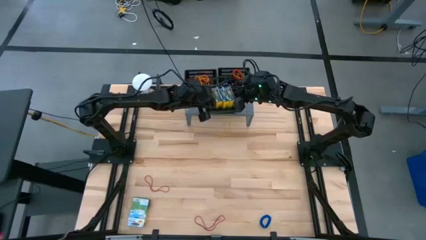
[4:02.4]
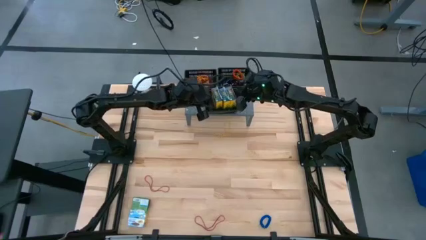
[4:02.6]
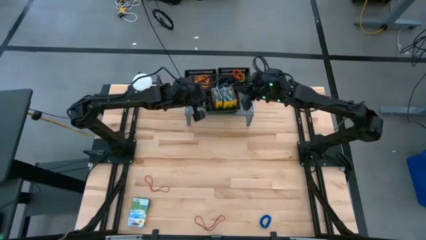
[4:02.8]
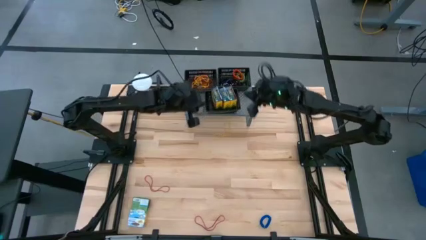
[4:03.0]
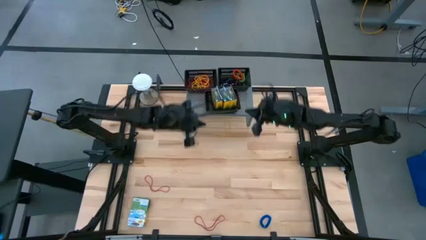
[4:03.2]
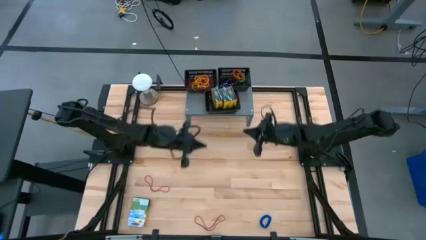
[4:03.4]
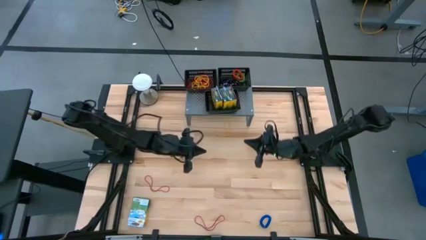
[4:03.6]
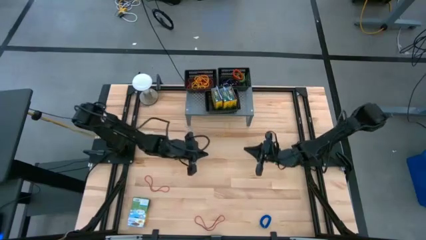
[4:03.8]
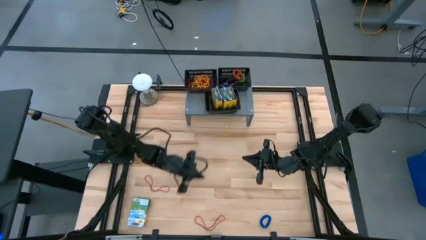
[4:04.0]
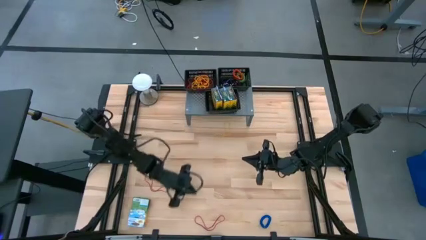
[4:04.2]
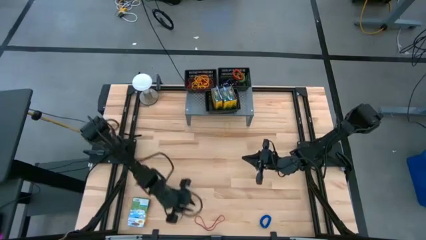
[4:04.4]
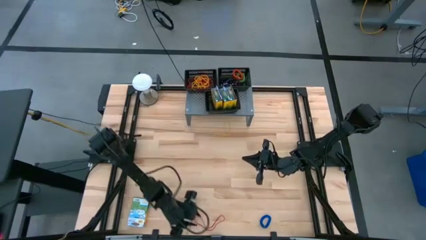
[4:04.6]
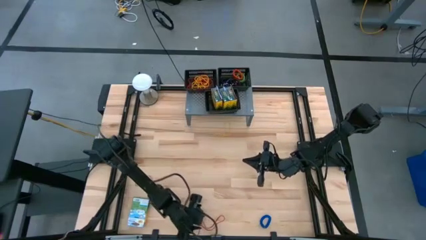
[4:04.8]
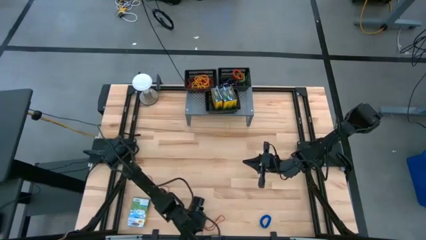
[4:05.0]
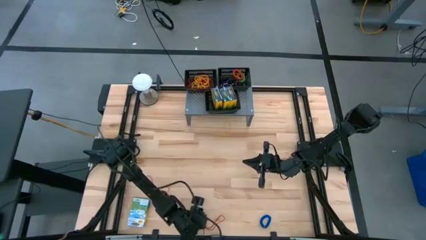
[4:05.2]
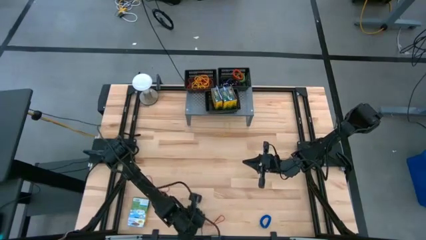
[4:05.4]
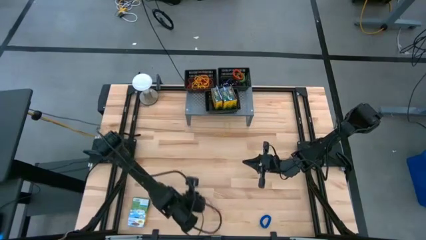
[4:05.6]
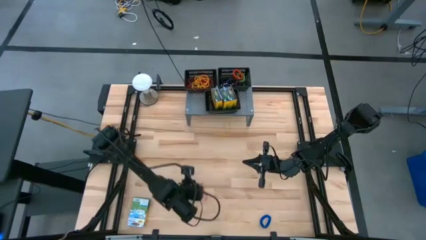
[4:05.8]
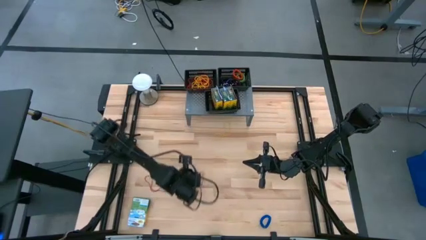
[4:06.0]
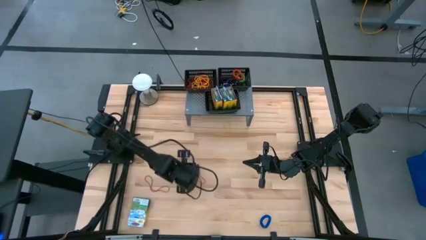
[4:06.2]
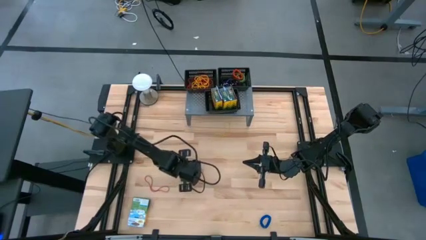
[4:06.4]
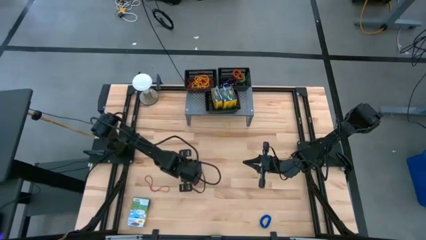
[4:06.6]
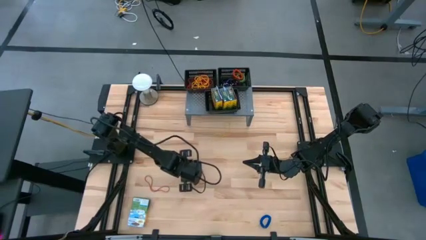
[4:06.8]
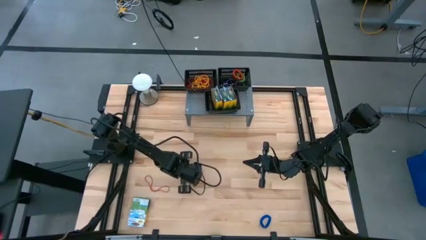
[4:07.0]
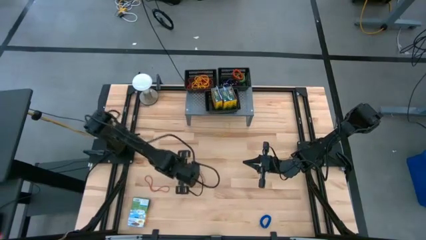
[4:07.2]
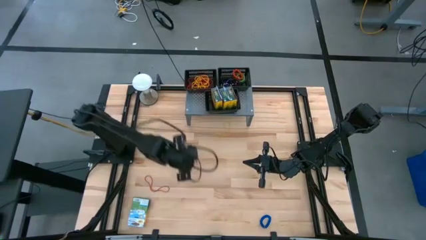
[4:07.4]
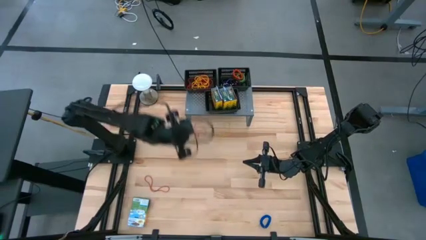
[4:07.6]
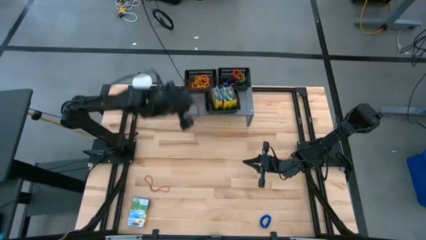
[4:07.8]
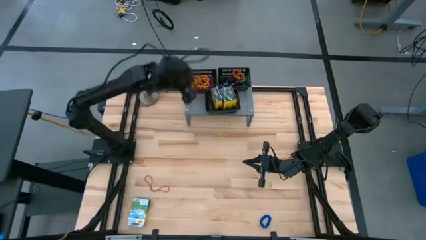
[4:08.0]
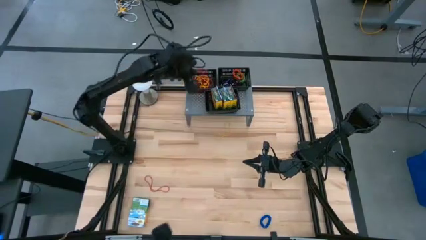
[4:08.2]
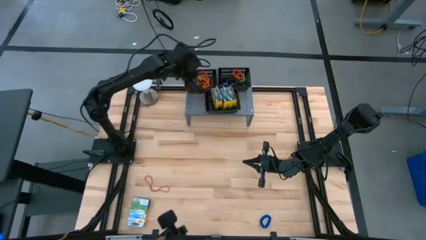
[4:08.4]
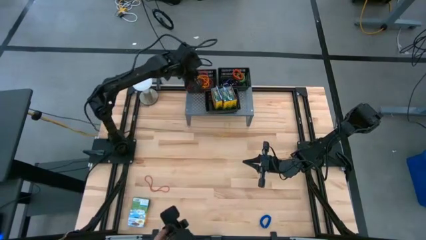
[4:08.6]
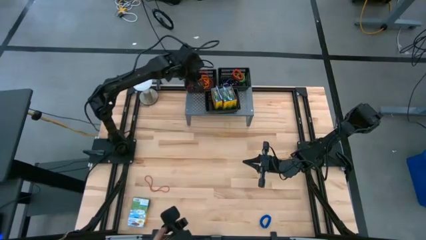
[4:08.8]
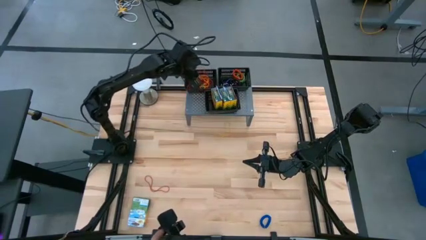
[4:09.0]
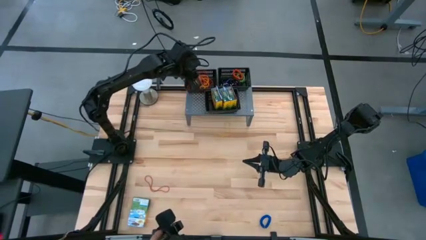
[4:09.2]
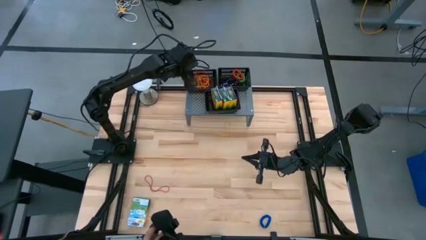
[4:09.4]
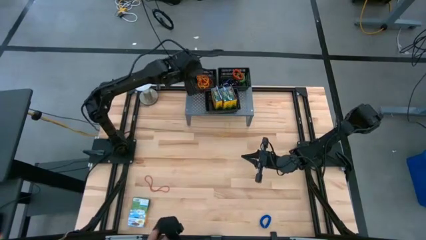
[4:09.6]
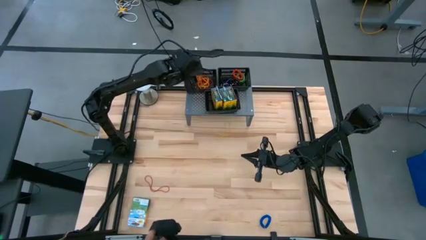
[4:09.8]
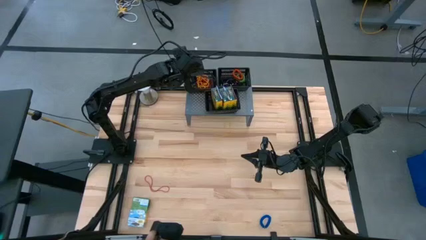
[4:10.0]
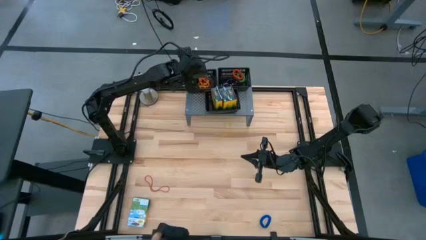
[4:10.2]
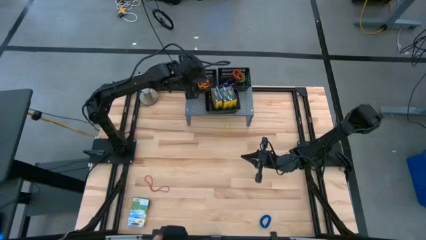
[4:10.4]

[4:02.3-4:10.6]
Task: Pick & Place Office Desk Supplies
Put the red rubber band into the top left black basket on the shelf

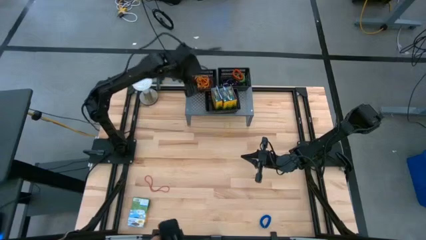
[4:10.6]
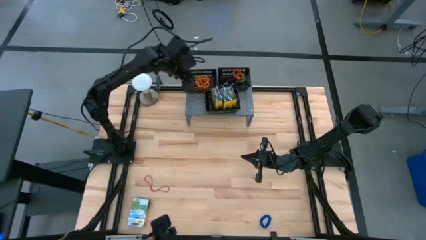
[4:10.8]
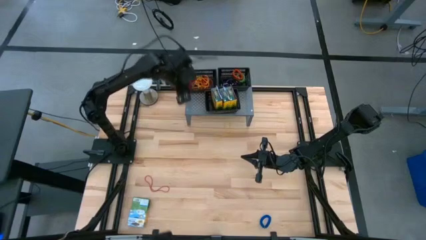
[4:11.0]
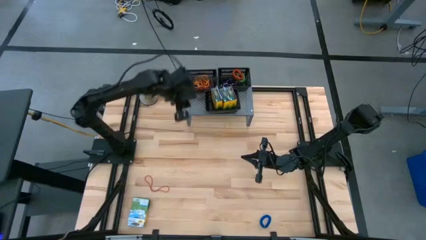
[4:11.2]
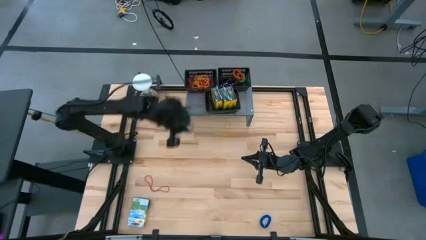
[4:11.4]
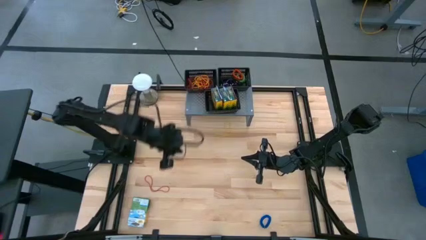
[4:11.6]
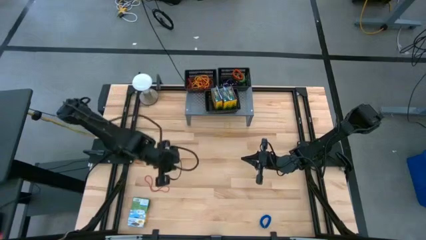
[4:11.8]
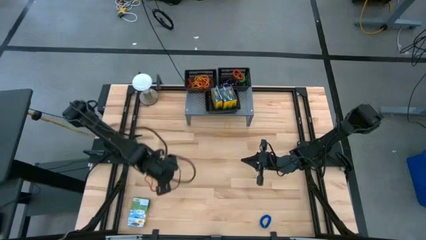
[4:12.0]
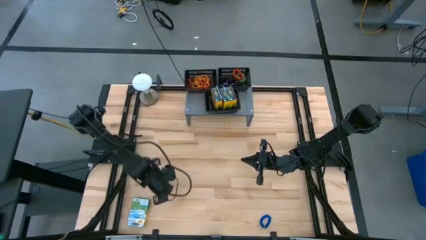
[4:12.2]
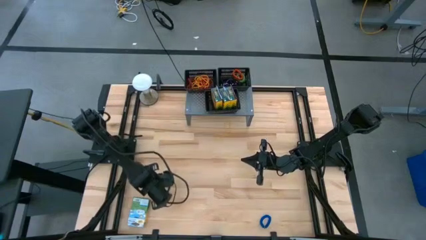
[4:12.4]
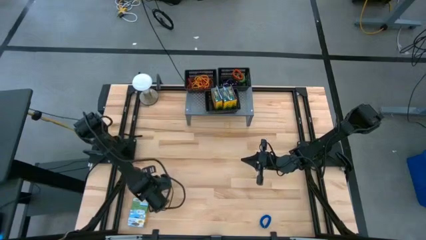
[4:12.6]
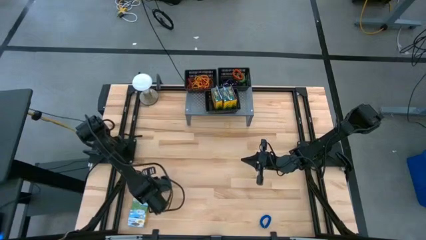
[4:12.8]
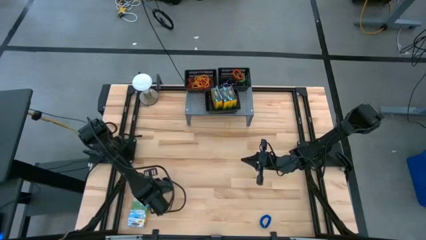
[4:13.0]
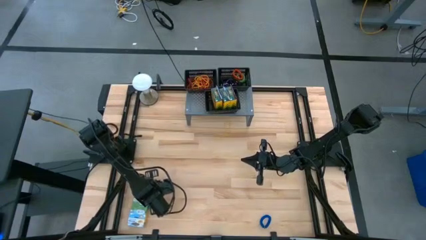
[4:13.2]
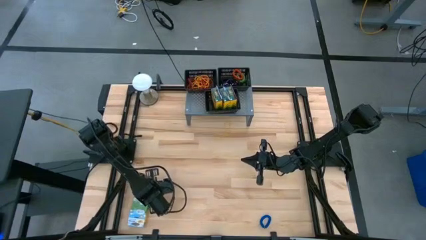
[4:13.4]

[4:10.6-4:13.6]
Put the red rubber band into the top left black basket on the shelf

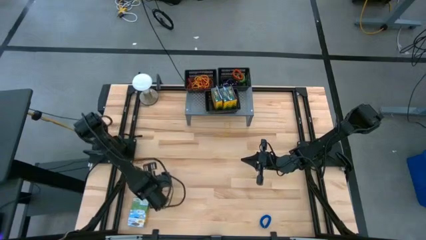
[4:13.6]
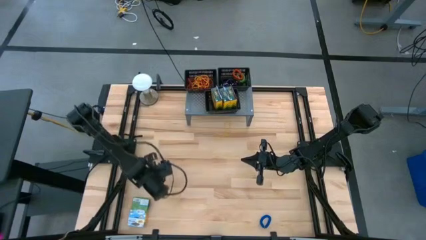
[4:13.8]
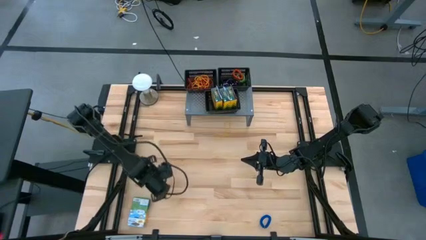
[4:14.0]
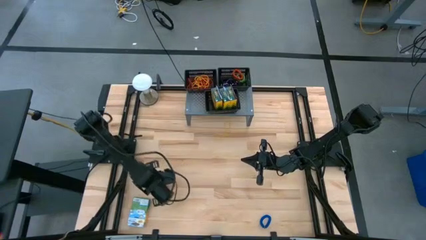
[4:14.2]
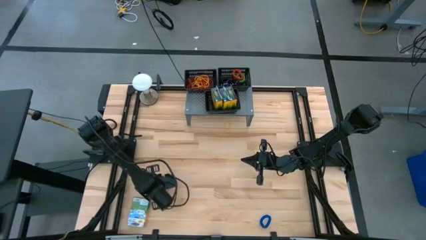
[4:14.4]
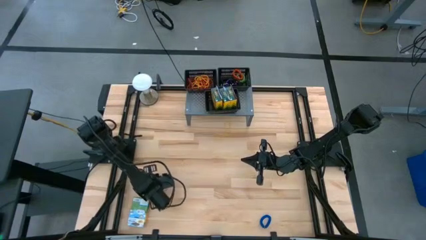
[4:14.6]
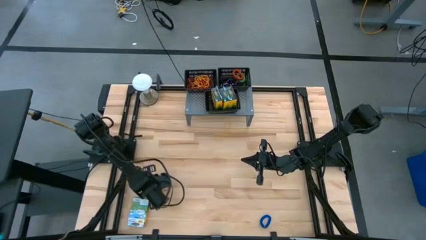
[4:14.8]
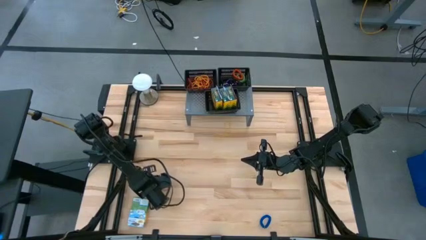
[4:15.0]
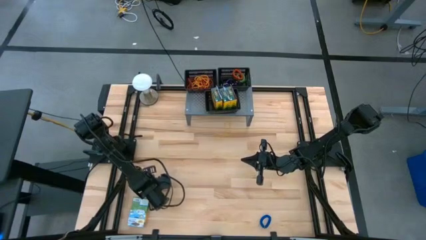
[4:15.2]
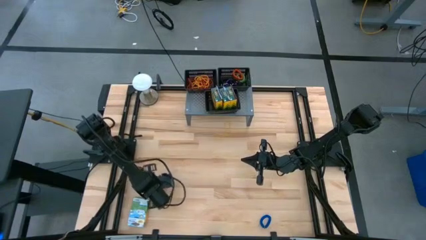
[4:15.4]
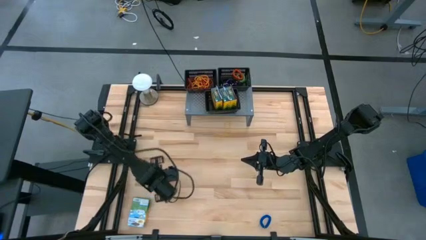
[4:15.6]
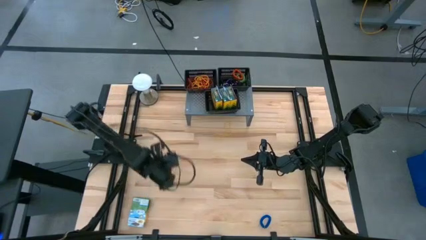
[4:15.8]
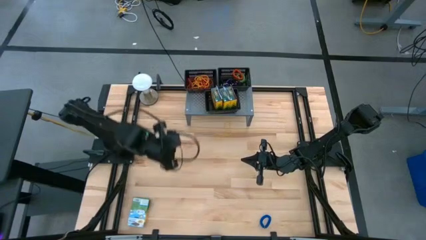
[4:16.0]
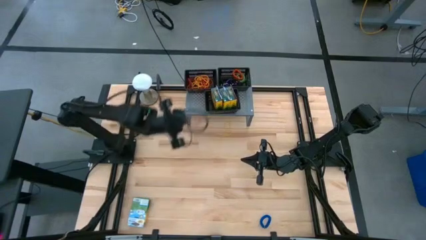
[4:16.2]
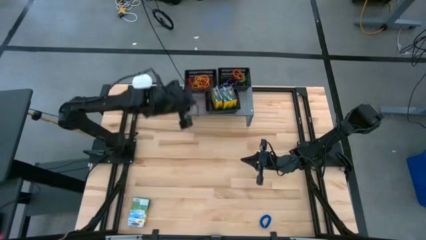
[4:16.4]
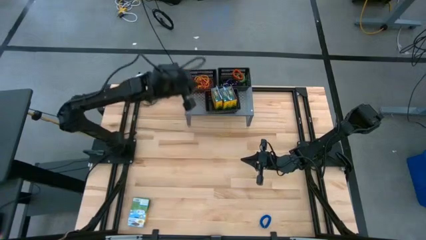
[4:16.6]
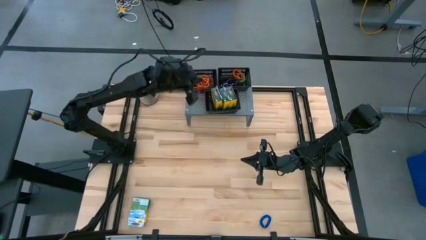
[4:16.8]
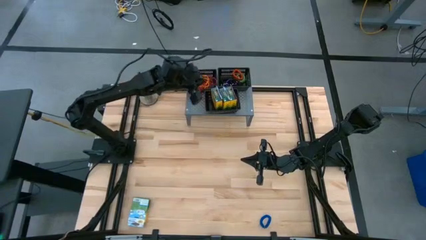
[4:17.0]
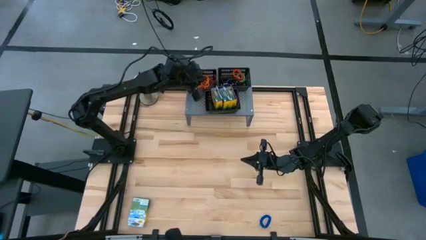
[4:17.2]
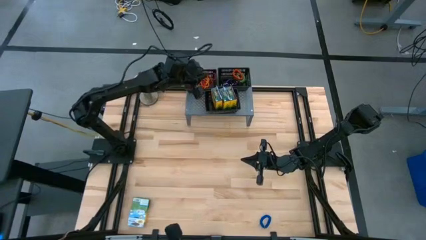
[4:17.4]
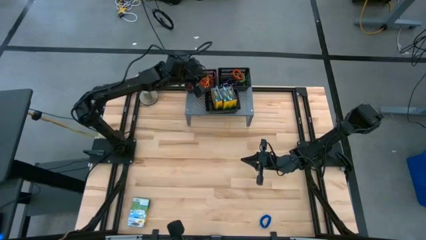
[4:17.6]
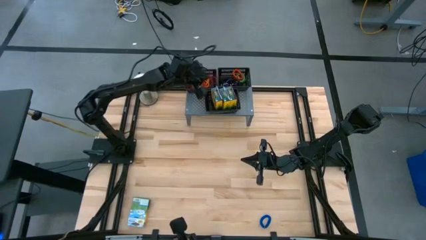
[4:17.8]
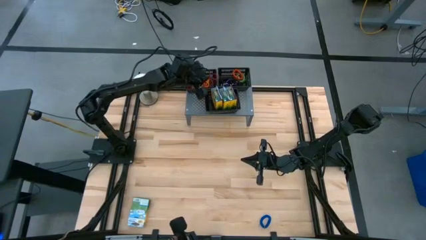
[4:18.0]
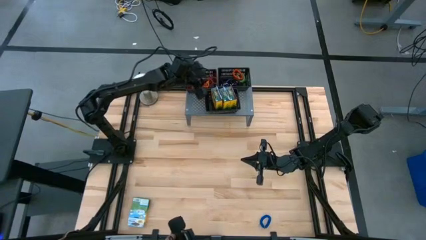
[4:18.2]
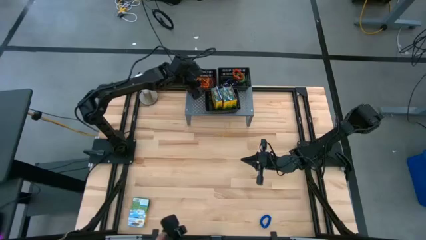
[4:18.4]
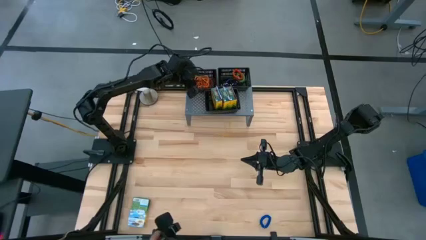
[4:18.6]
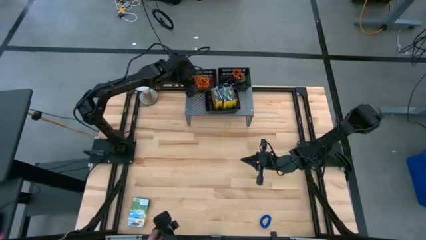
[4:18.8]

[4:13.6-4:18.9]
Put the red rubber band into the top left black basket on the shelf
